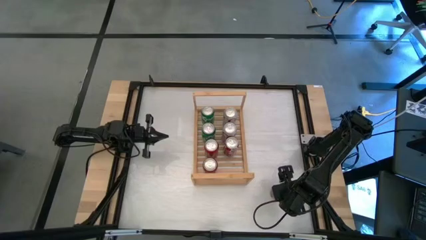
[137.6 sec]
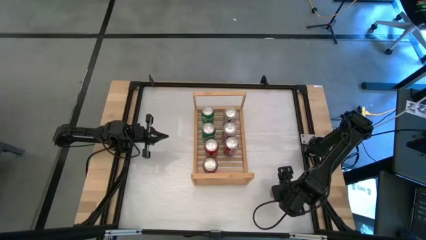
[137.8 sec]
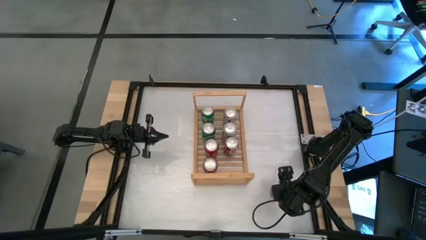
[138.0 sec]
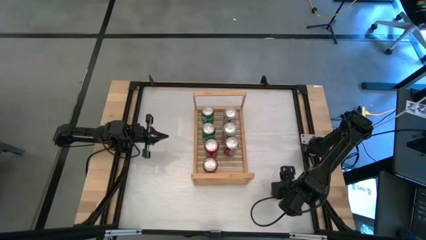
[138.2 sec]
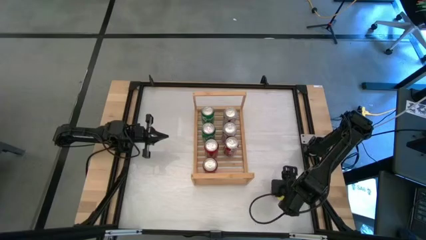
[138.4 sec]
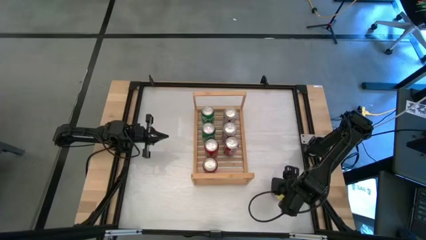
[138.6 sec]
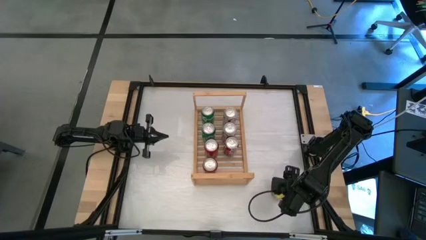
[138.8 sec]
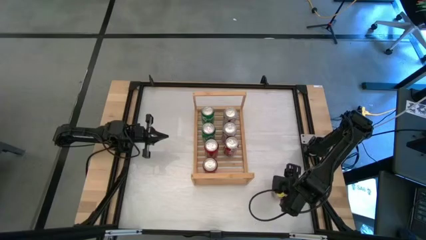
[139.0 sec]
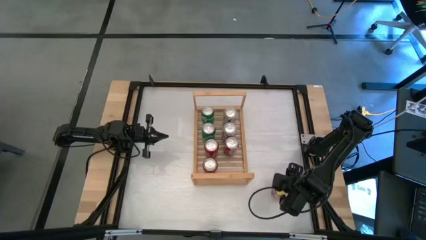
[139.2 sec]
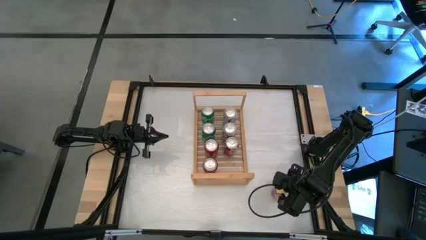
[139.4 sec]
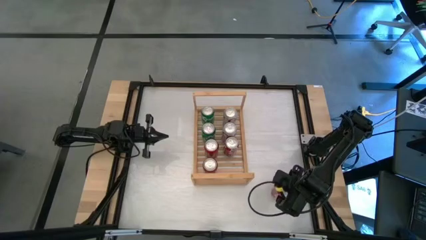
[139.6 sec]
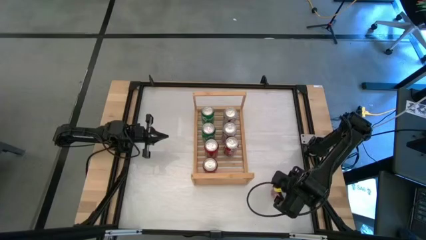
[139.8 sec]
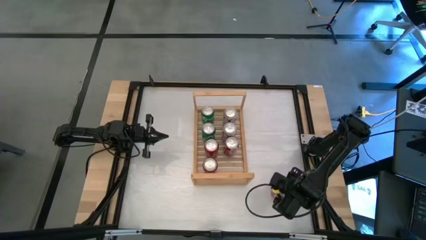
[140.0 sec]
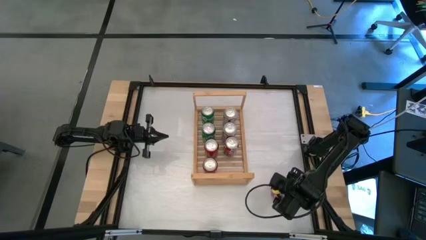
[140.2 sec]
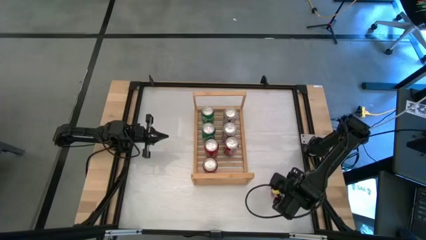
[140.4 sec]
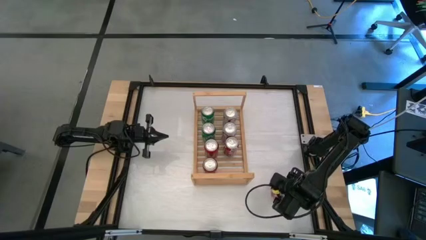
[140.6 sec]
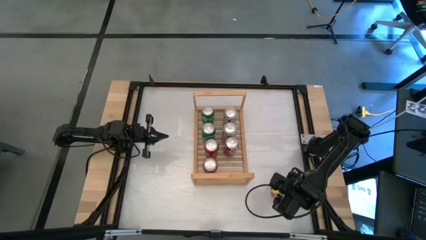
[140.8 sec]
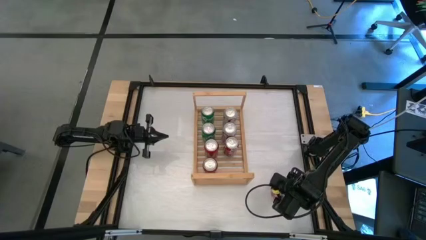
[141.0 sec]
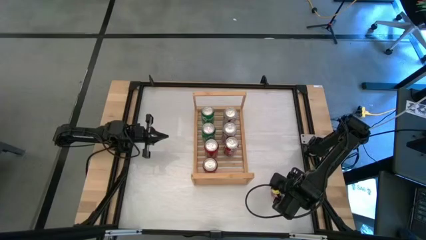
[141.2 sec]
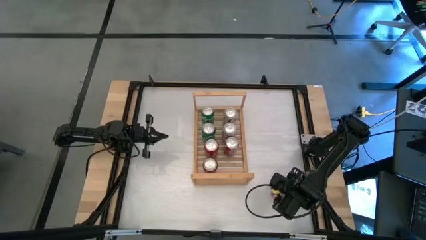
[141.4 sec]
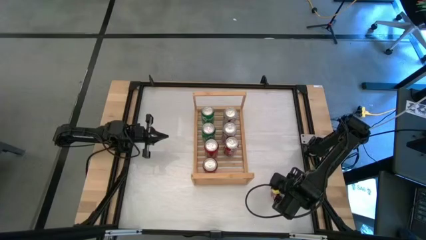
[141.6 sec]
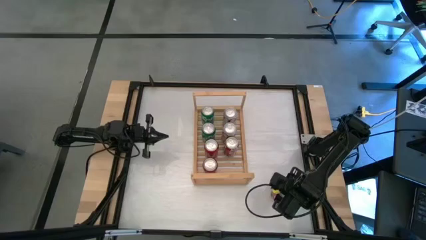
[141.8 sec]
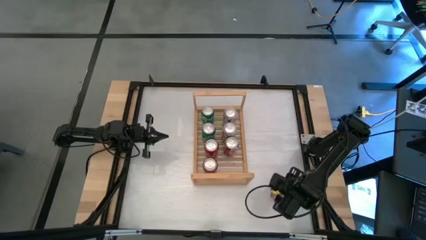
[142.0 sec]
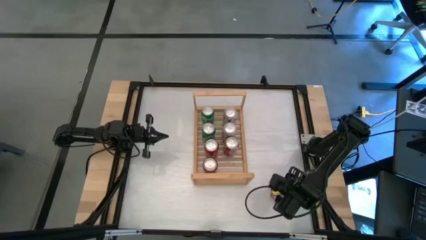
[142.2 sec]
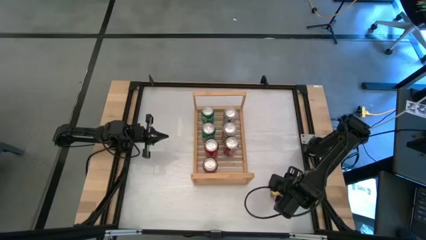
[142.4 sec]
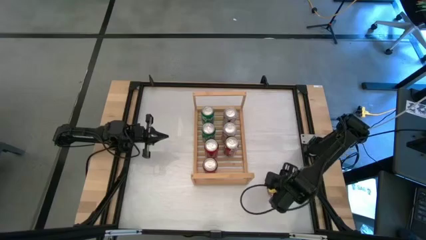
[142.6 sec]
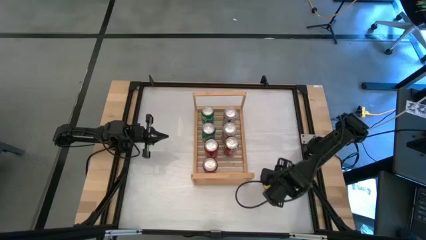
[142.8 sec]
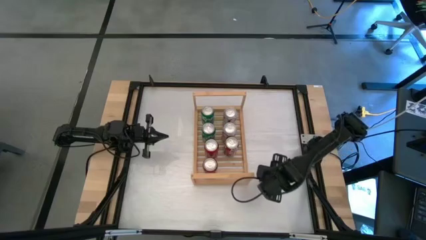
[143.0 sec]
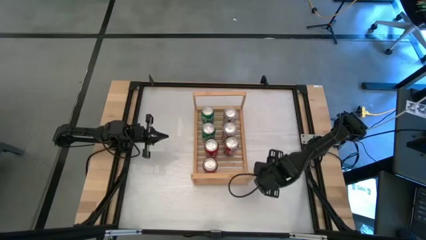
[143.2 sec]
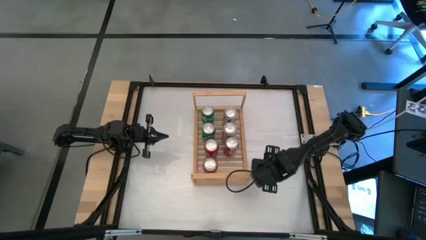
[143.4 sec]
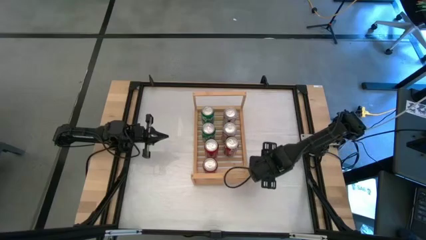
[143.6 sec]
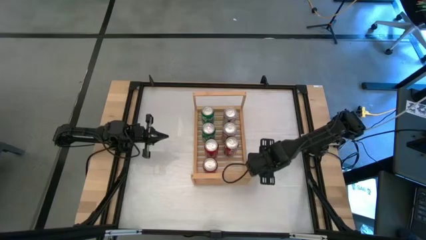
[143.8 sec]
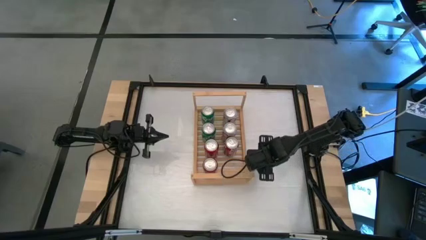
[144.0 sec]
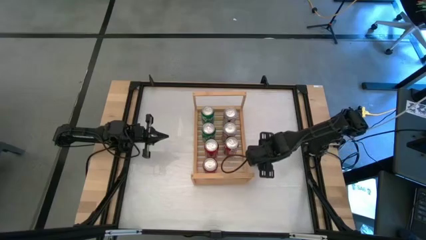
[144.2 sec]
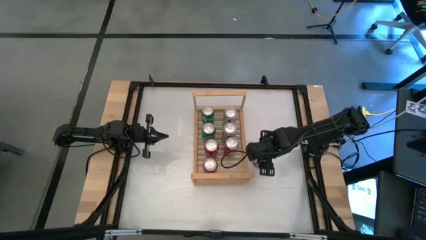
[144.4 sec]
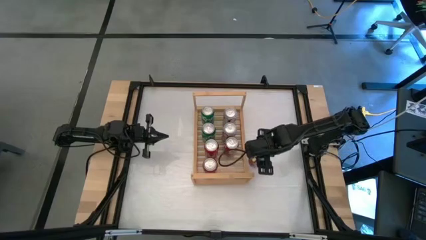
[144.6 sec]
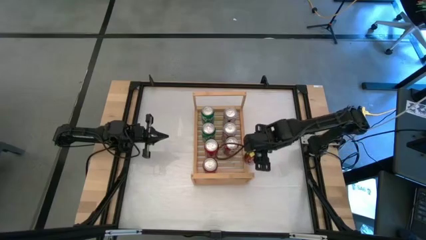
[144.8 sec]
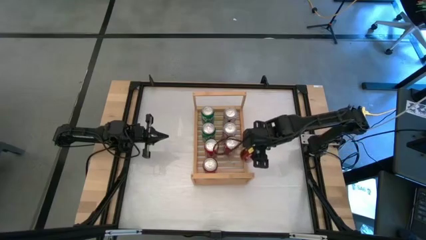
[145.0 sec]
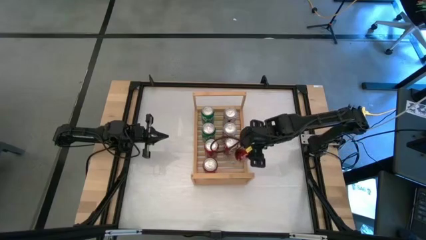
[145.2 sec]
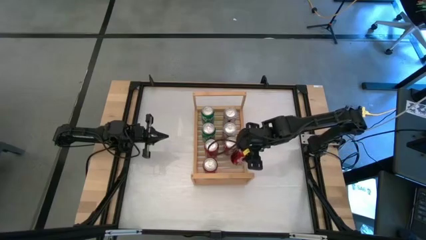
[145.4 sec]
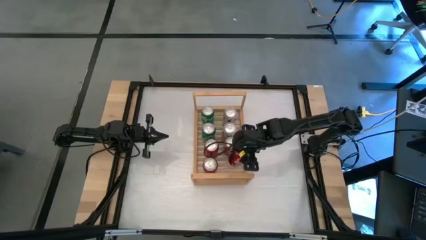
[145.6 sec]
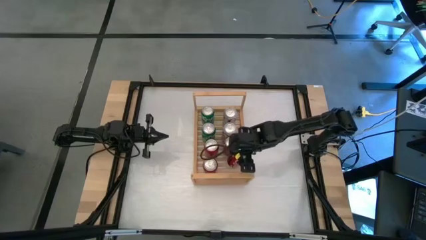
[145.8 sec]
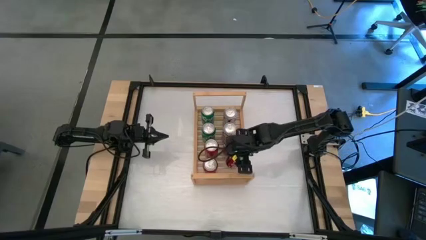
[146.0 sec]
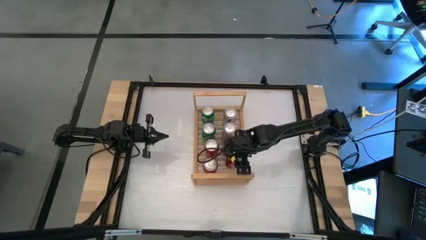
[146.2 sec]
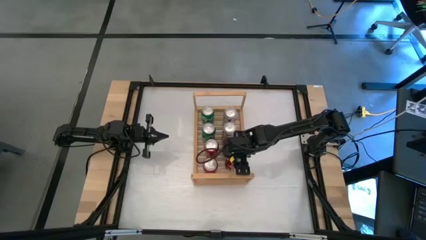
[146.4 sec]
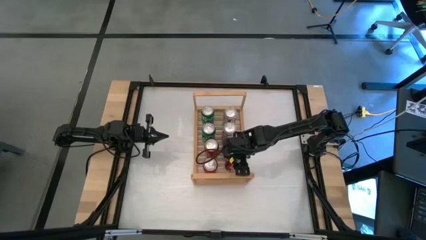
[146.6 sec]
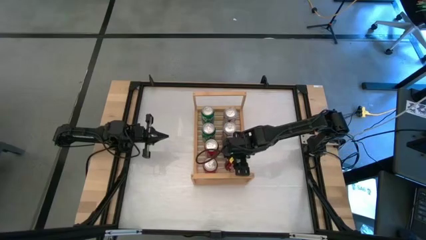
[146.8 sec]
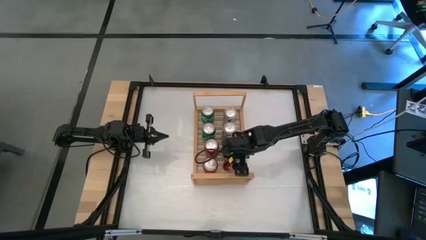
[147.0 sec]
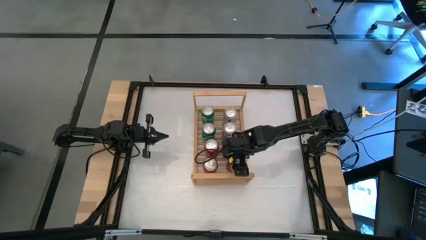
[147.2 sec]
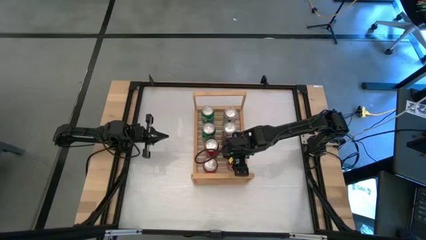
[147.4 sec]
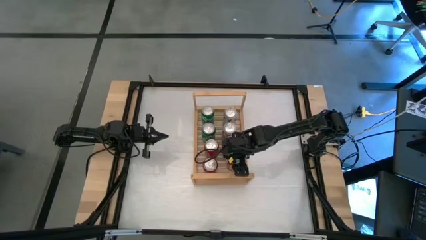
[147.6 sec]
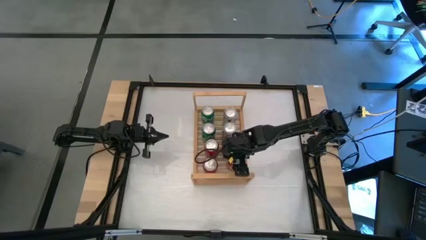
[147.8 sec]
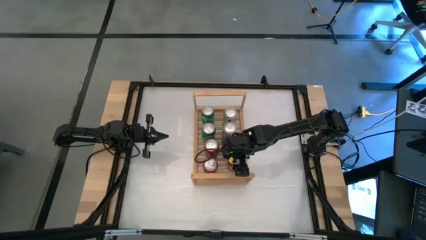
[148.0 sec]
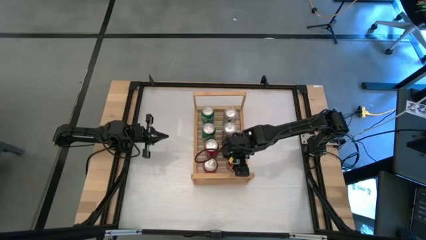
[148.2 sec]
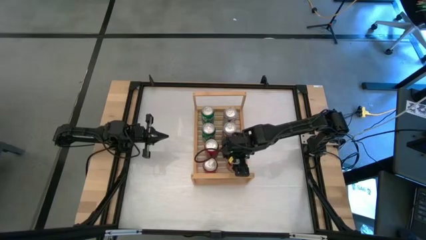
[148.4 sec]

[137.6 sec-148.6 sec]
Task: Place canned beverage on shelf
Put the red soda on the shelf

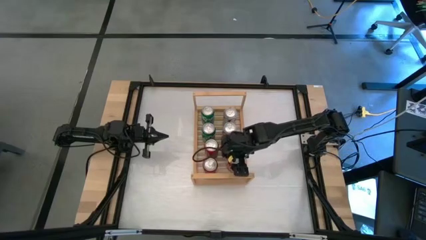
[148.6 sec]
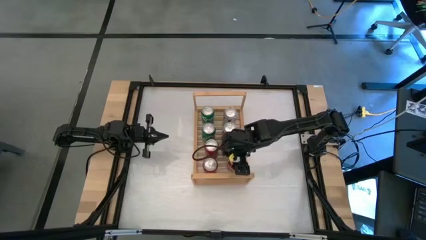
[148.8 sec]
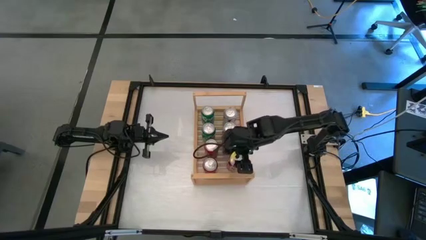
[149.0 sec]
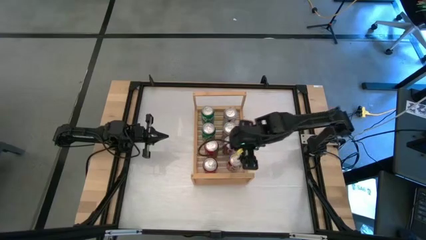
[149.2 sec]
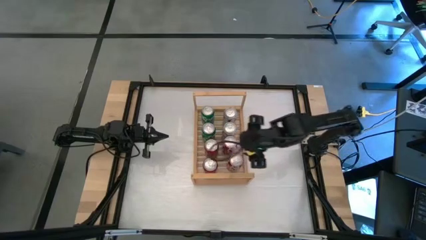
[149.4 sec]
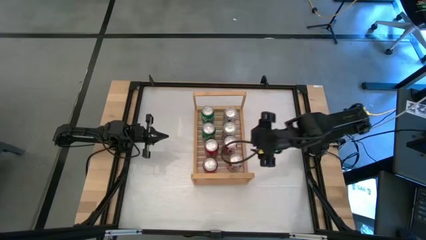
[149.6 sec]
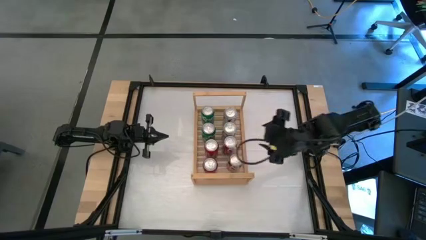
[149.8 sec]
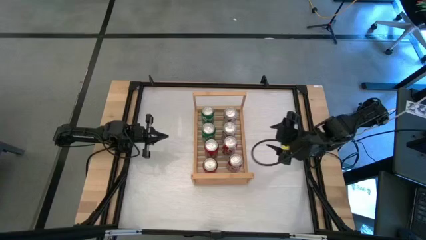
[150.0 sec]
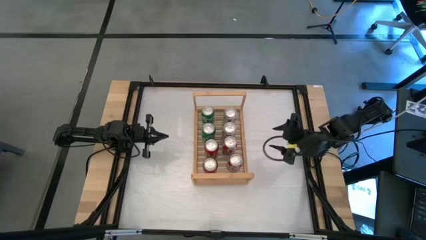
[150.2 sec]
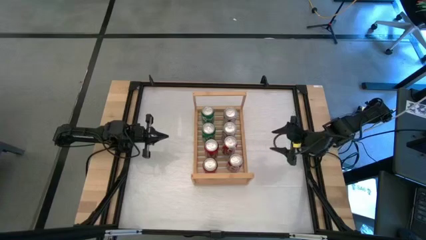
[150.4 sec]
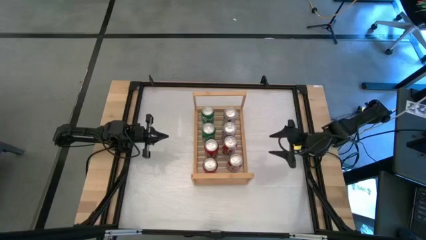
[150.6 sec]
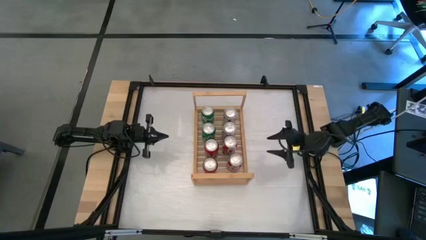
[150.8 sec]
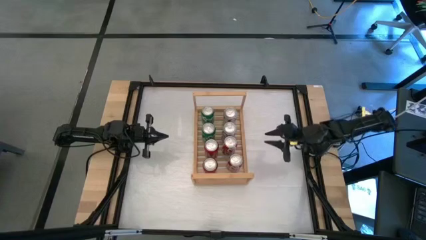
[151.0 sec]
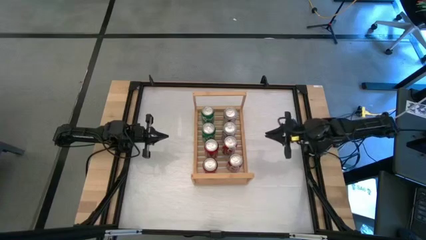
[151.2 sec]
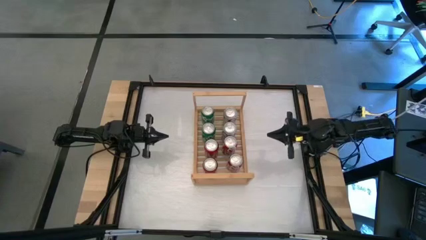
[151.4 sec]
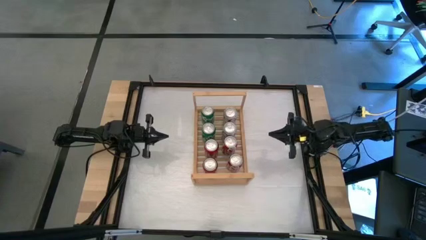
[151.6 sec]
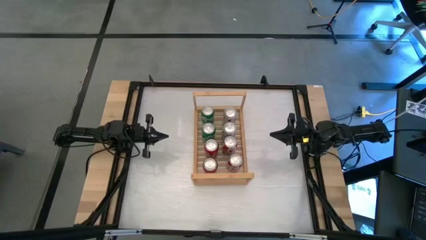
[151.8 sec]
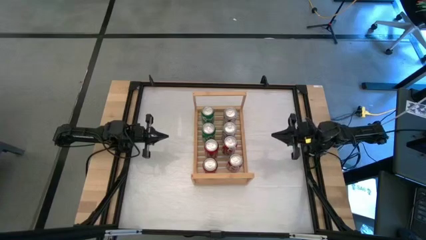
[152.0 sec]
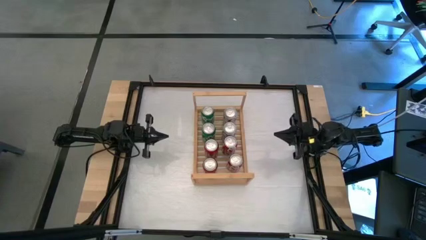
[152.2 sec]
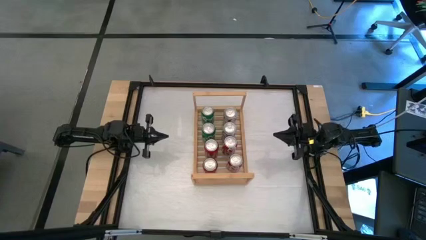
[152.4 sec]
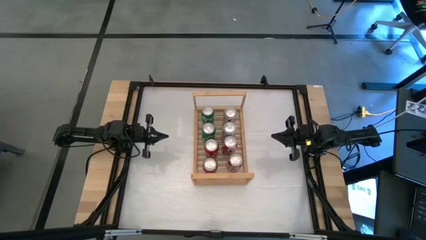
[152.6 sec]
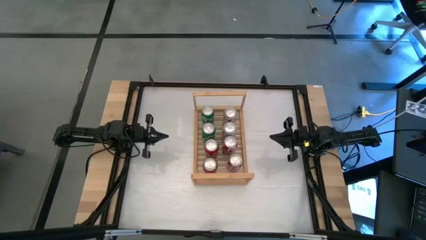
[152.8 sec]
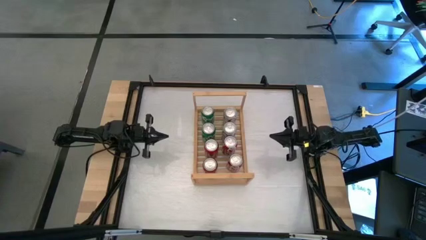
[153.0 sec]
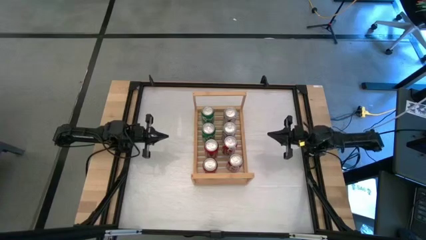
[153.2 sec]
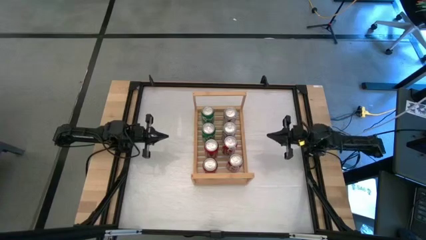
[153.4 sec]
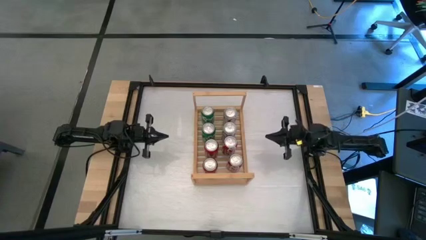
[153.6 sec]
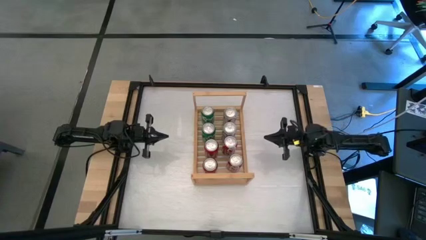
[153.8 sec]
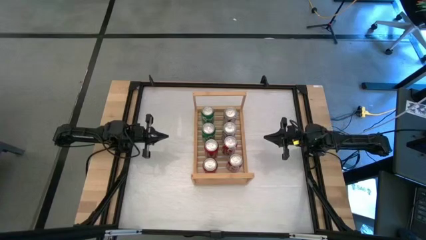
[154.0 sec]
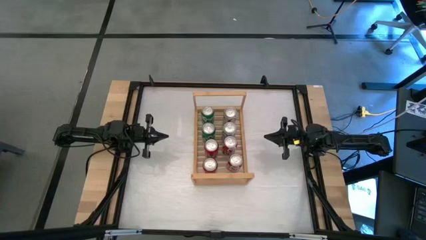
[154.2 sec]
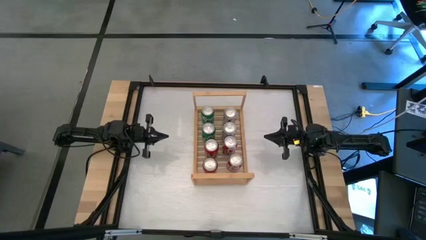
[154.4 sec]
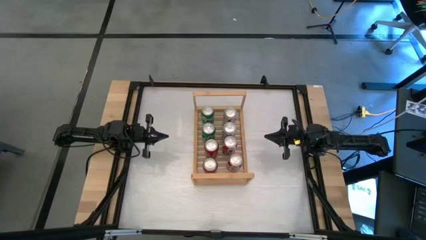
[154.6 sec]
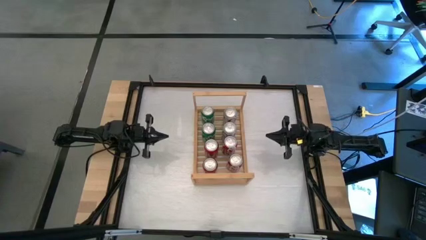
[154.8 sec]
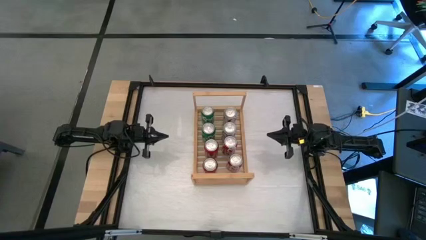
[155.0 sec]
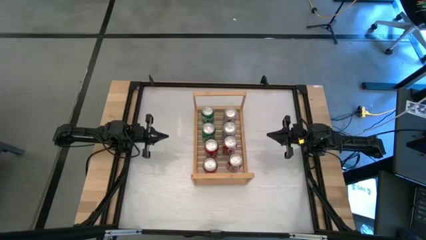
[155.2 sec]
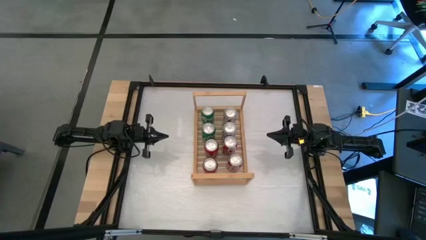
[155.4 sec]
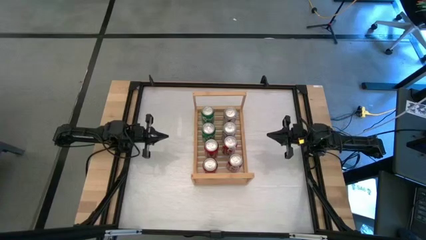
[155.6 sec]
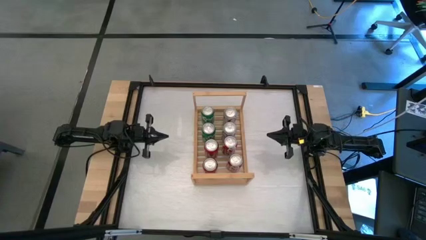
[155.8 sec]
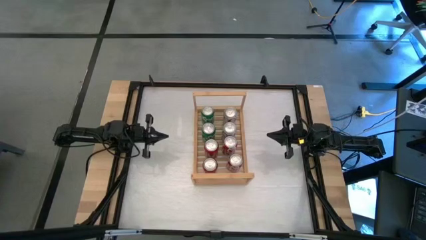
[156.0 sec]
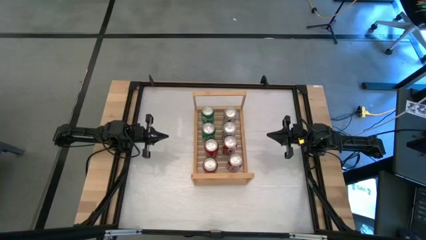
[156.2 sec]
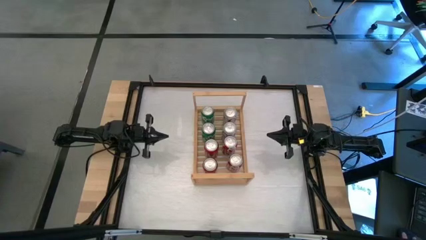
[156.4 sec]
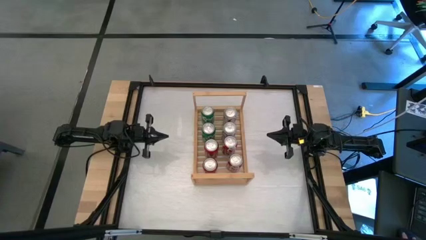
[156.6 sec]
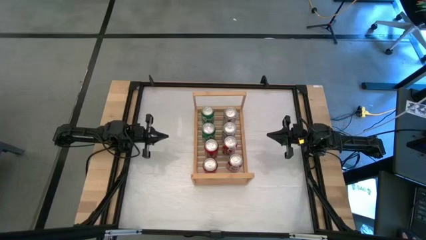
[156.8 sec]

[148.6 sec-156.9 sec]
Return to Home Position
